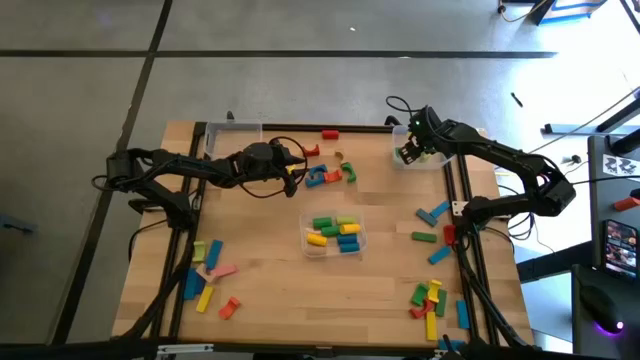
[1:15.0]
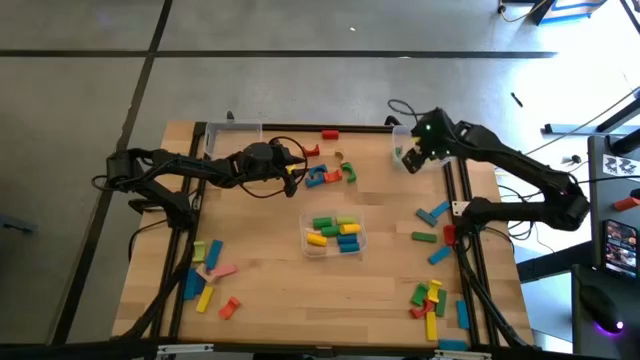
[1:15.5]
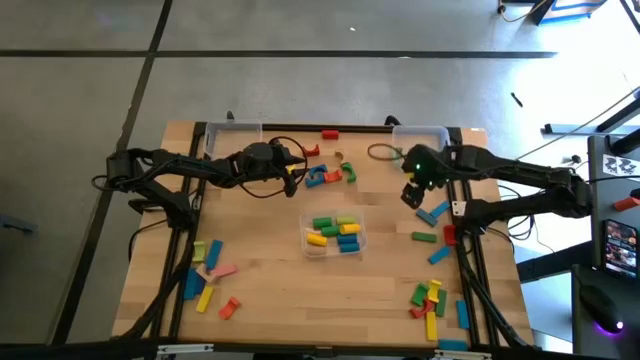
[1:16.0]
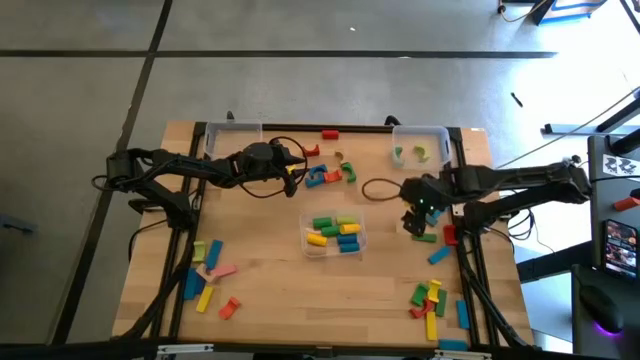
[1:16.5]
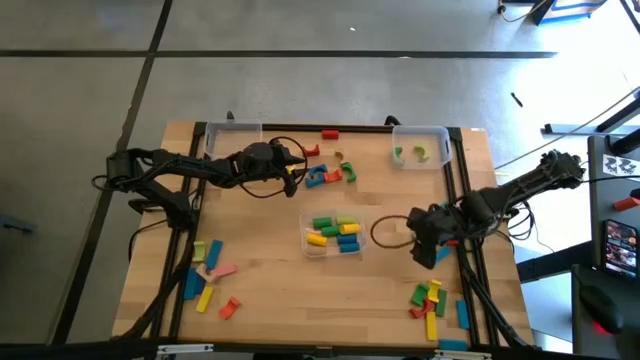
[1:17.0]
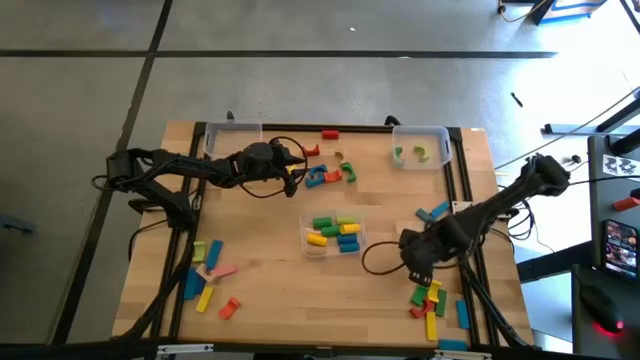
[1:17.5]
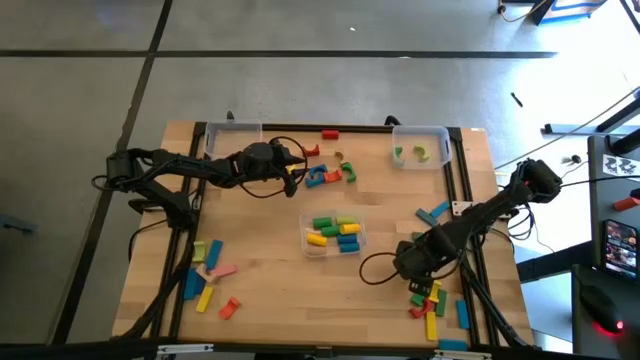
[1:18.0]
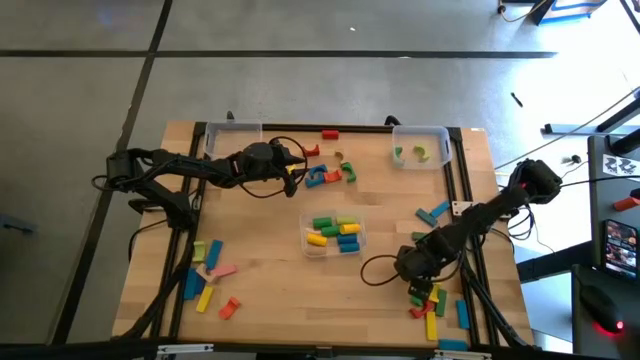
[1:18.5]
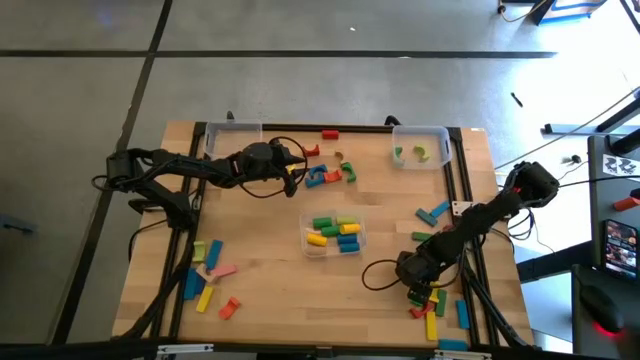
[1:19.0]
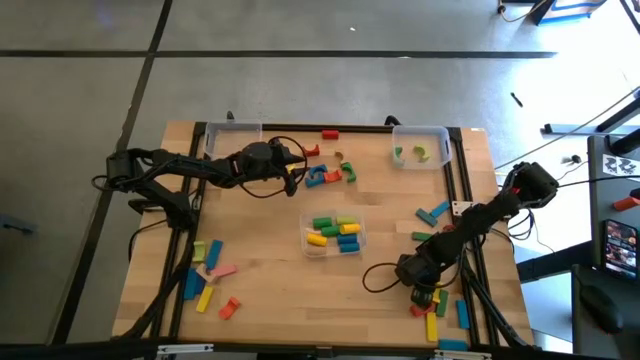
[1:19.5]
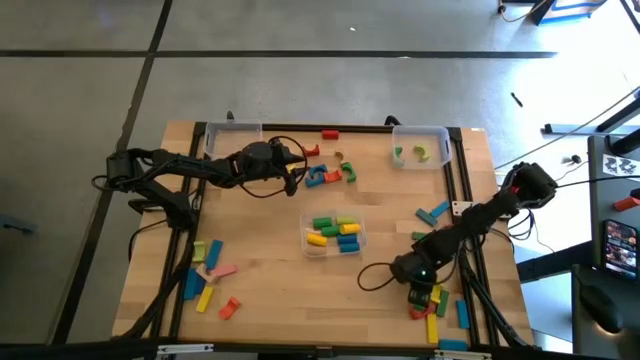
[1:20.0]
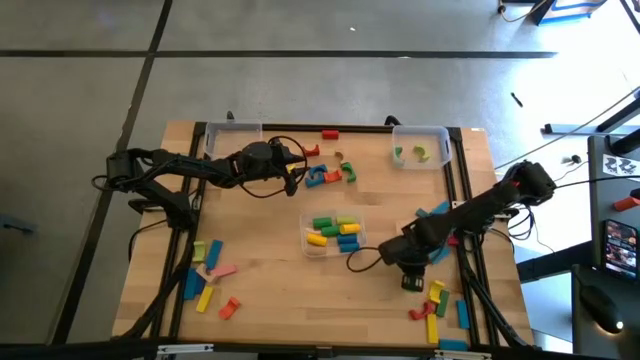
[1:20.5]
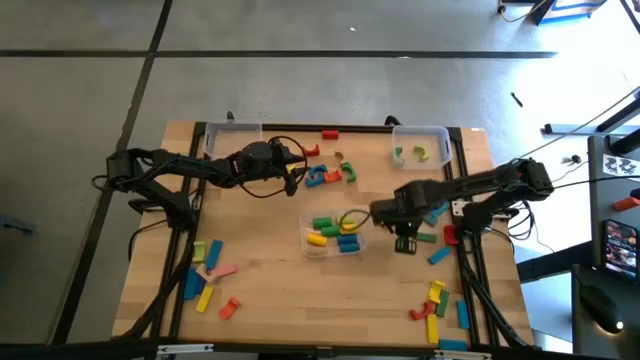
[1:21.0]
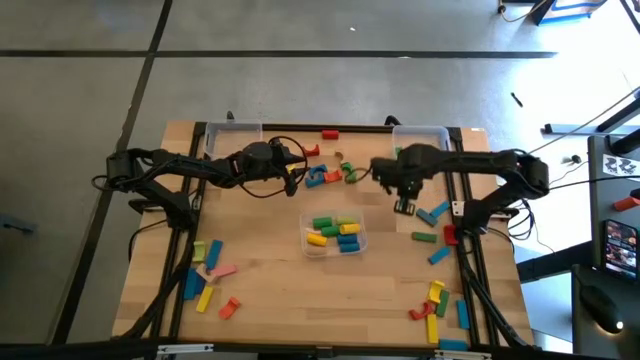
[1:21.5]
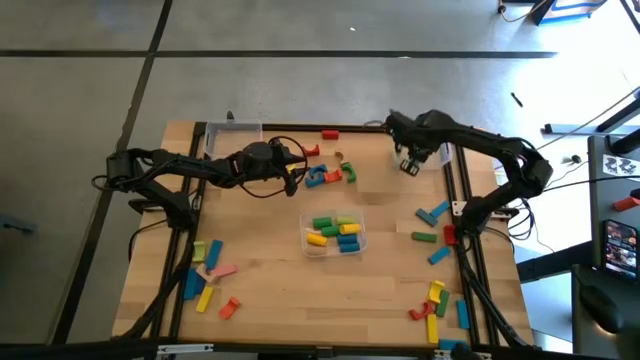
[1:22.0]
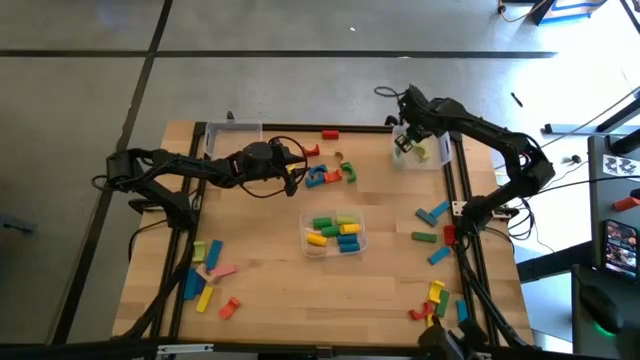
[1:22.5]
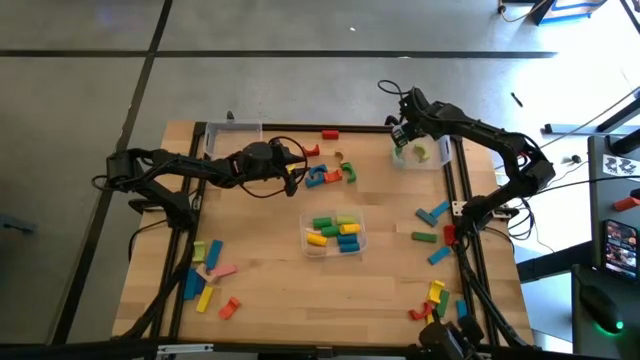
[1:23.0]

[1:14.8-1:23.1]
Task: Sort blocks by size
Put the green arch block into the top right transparent bin

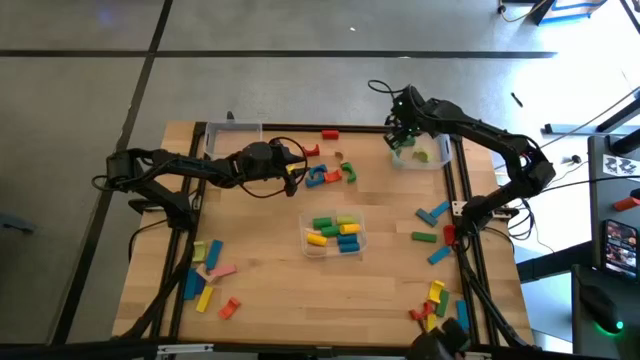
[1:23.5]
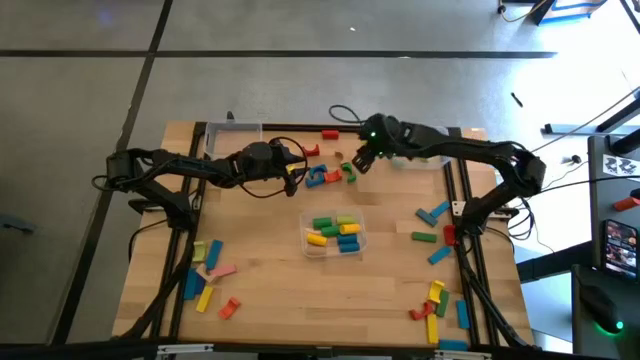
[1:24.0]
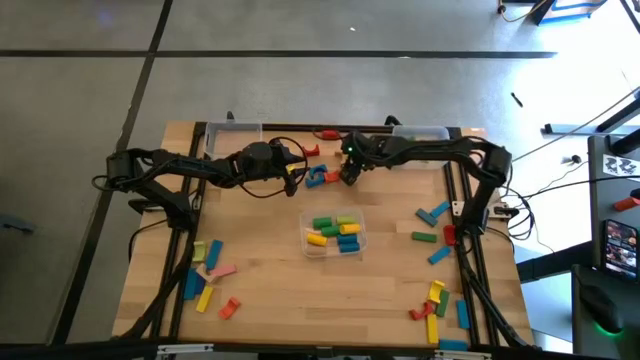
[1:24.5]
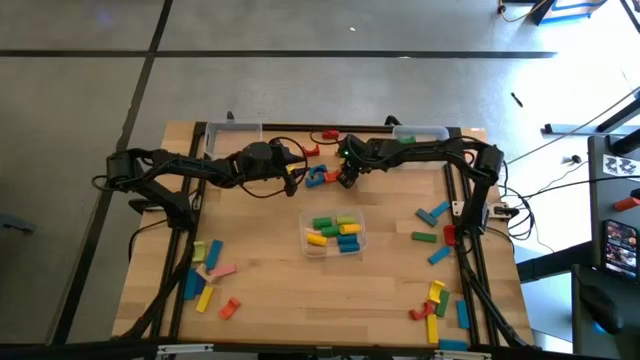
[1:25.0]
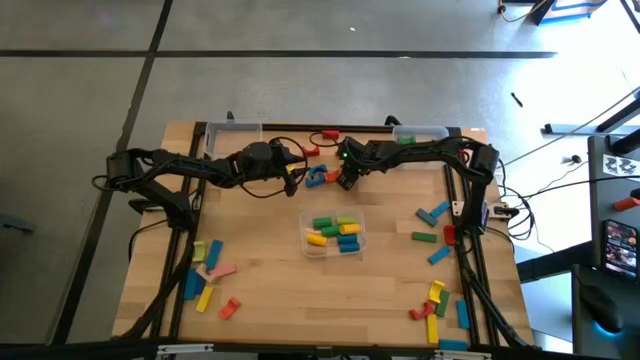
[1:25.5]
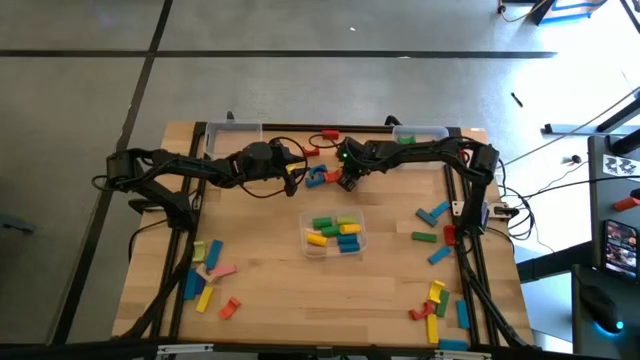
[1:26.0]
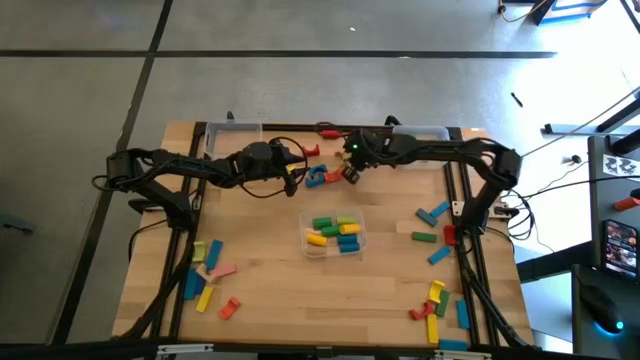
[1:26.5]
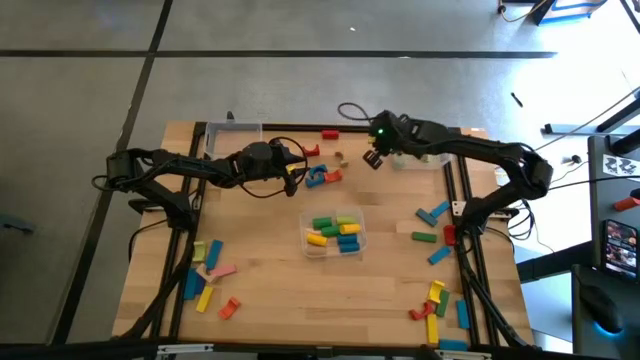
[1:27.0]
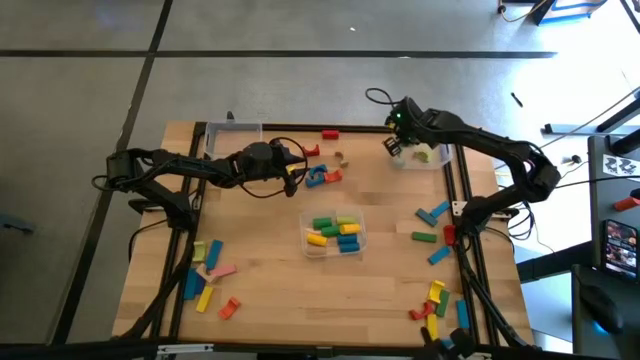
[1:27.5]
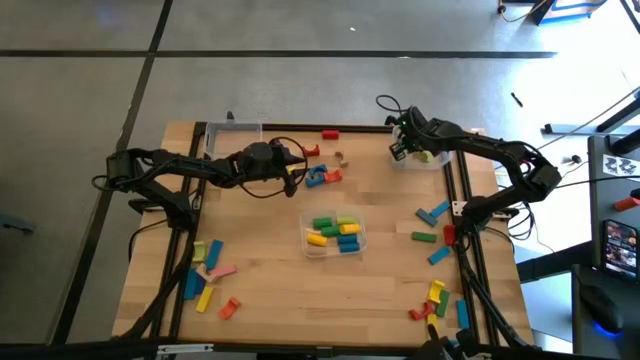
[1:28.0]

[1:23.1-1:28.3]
Put the green arch block into the top right transparent bin

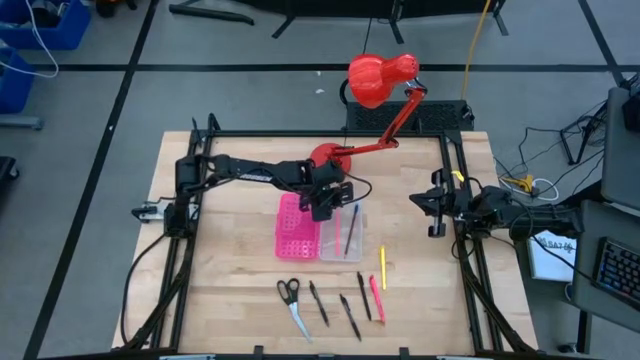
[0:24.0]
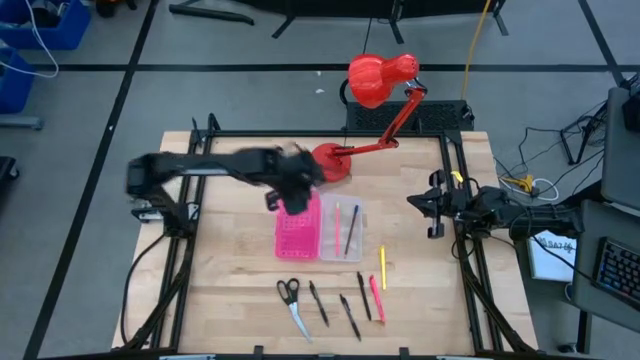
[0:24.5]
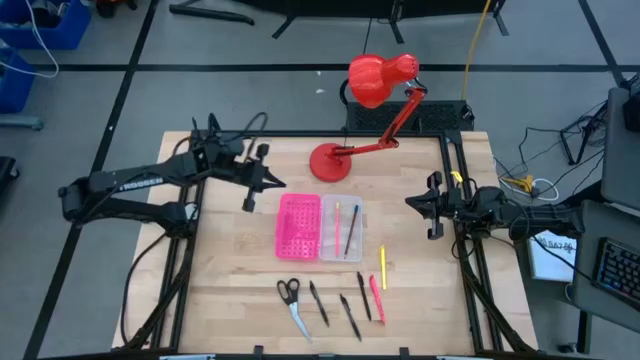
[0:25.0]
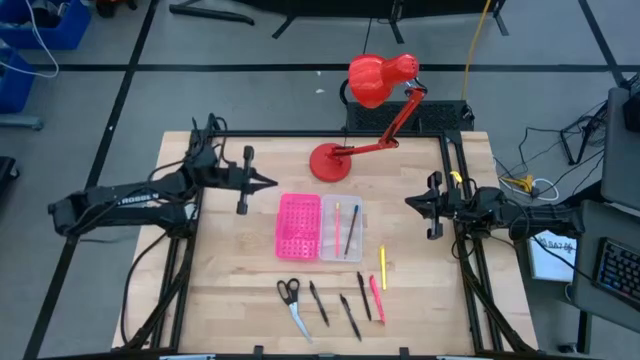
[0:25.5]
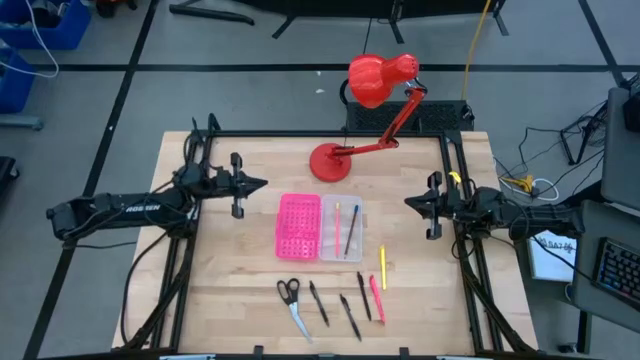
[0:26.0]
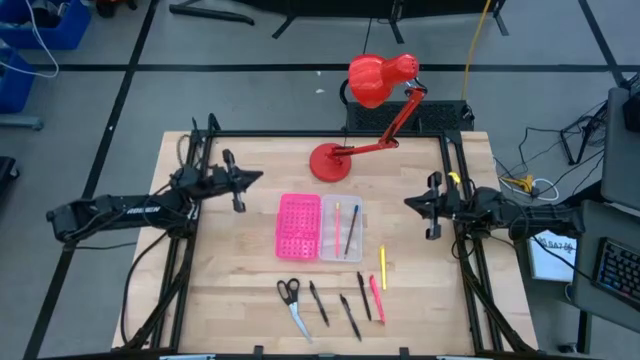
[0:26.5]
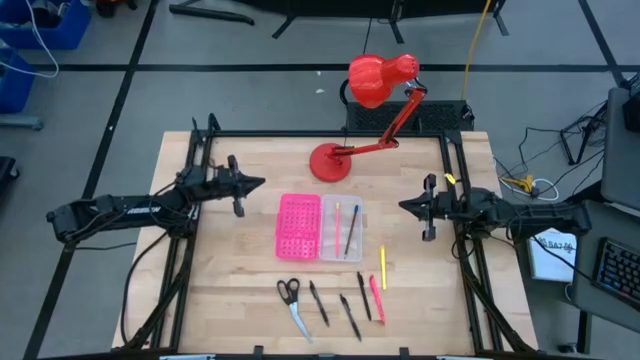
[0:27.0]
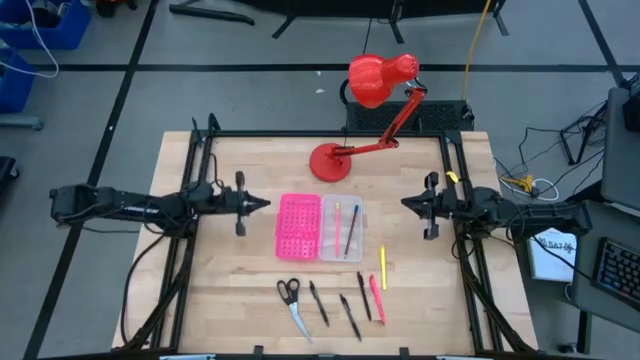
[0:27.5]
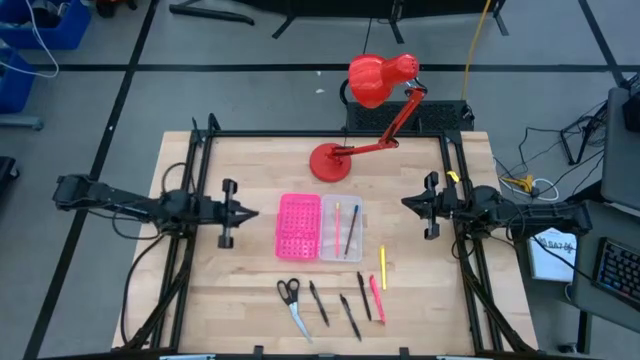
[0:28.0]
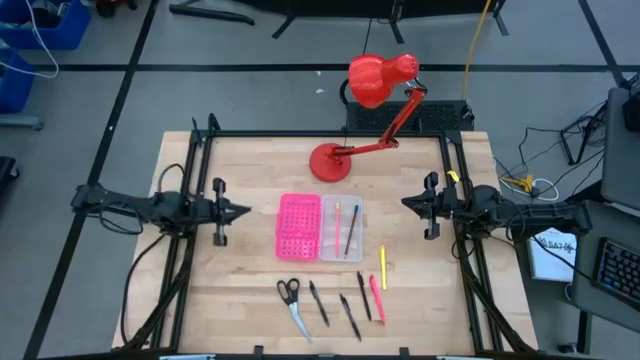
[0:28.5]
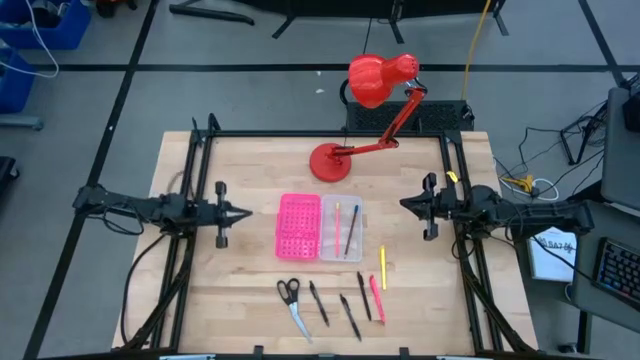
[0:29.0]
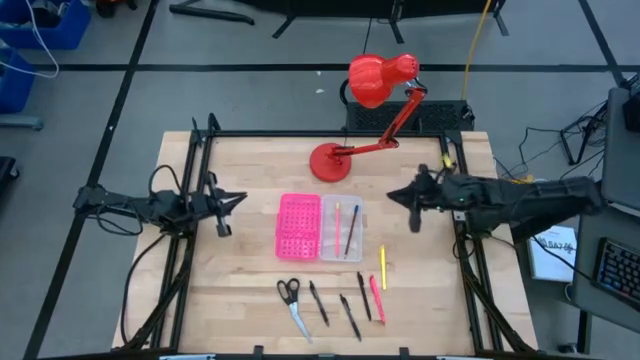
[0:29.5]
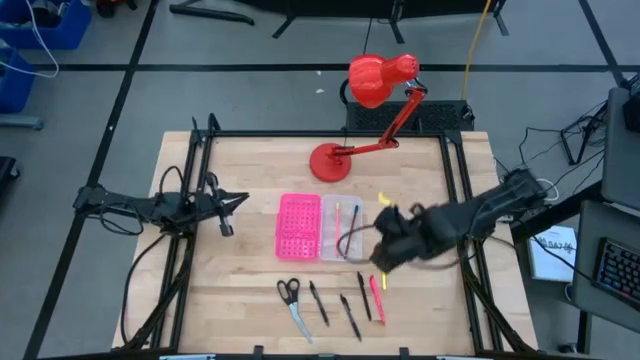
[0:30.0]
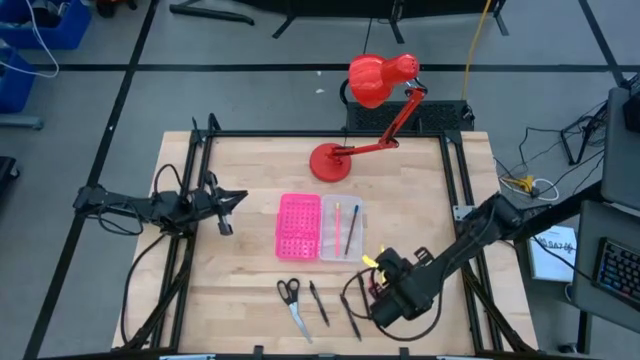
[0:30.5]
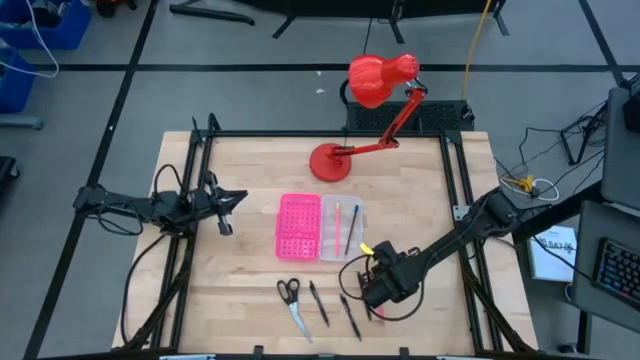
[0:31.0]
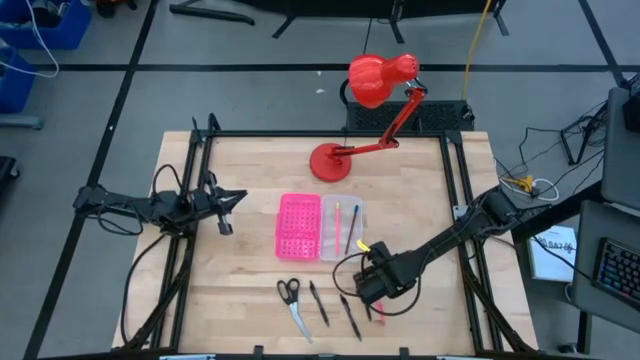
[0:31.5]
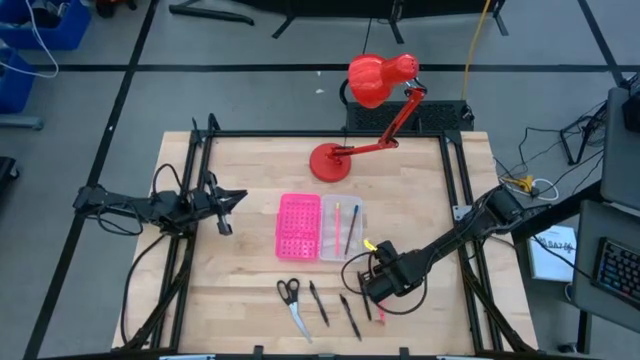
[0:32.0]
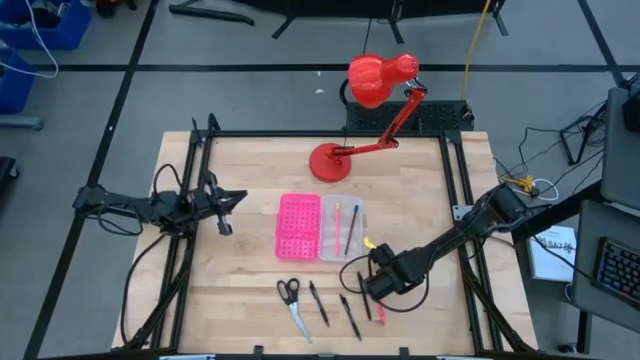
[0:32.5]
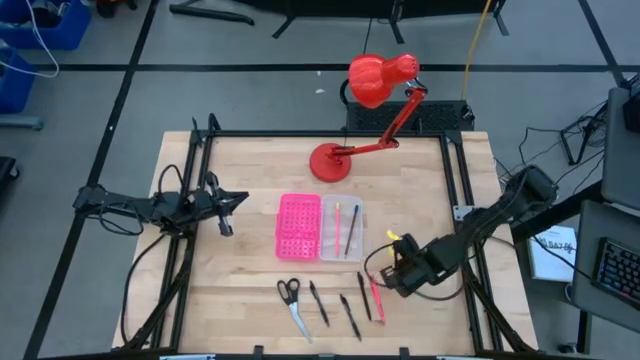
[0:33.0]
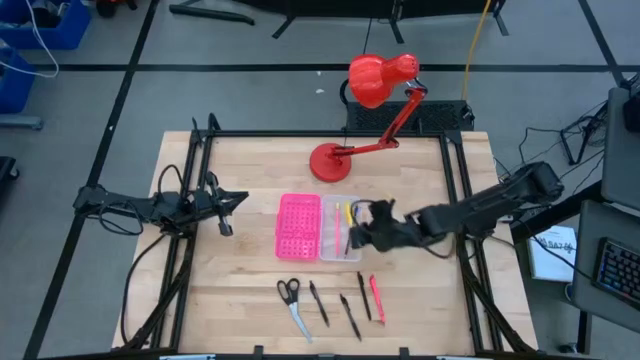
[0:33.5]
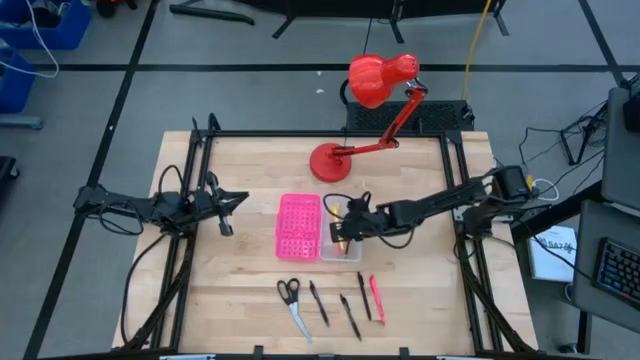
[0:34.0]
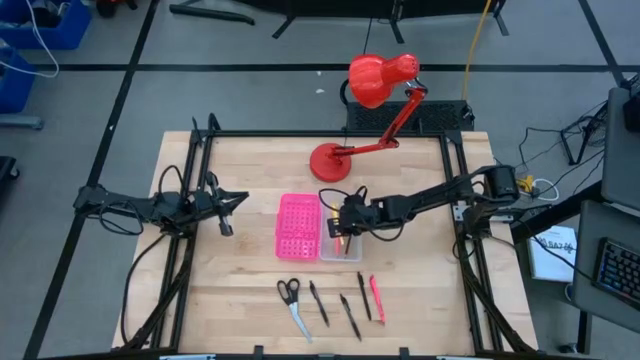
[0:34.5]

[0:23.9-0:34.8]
Task: Pick & place school supplies into a supply box
Put the yellow pen into the pink supply box
